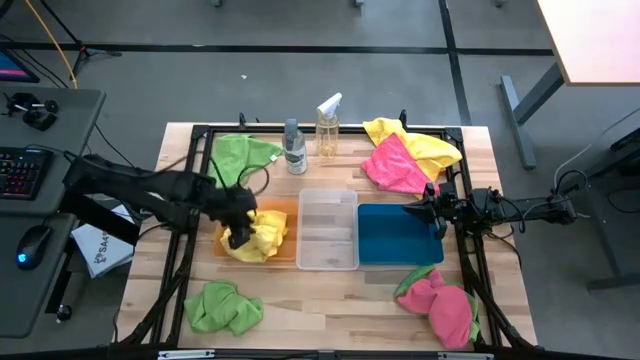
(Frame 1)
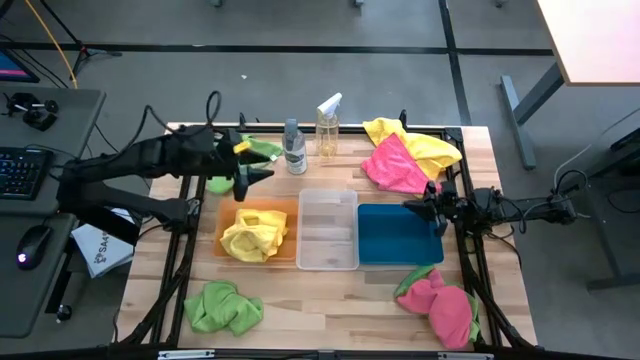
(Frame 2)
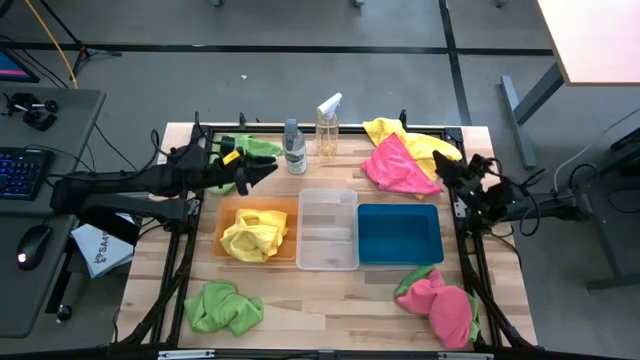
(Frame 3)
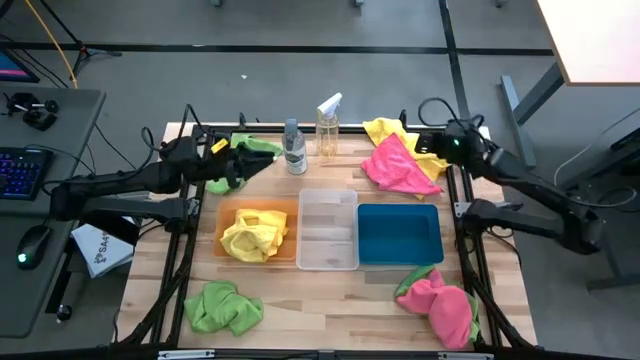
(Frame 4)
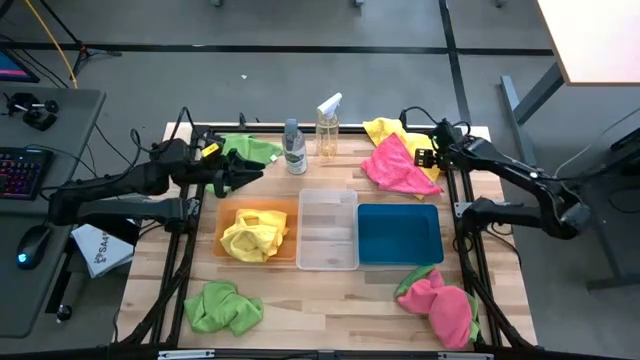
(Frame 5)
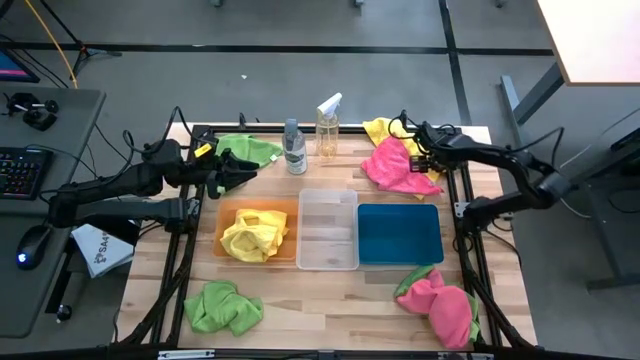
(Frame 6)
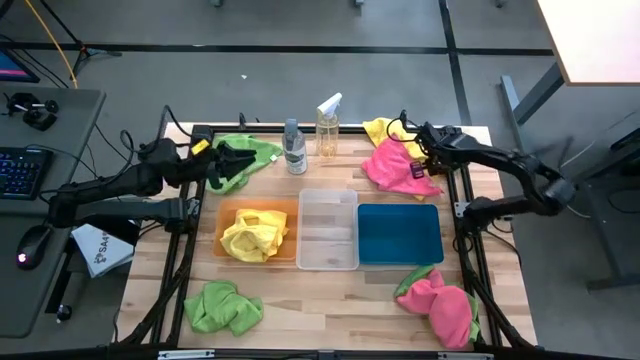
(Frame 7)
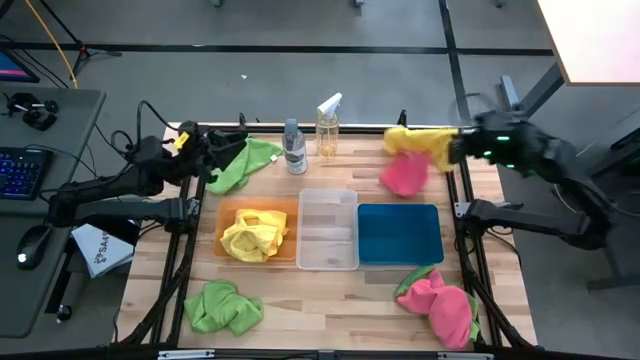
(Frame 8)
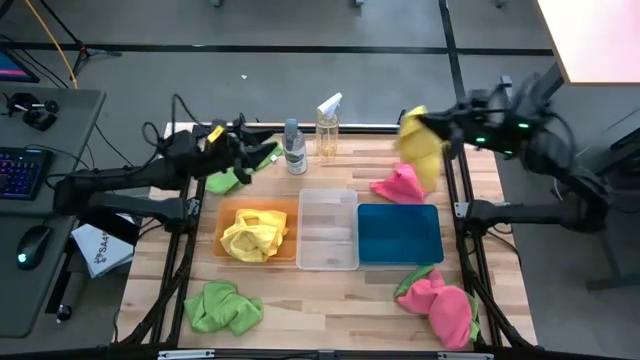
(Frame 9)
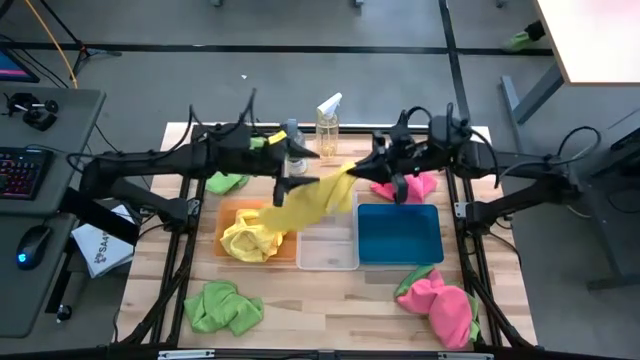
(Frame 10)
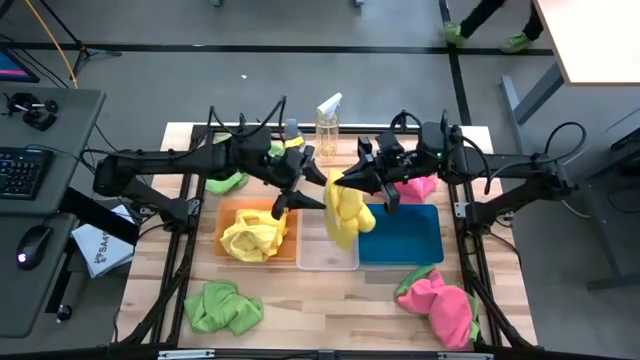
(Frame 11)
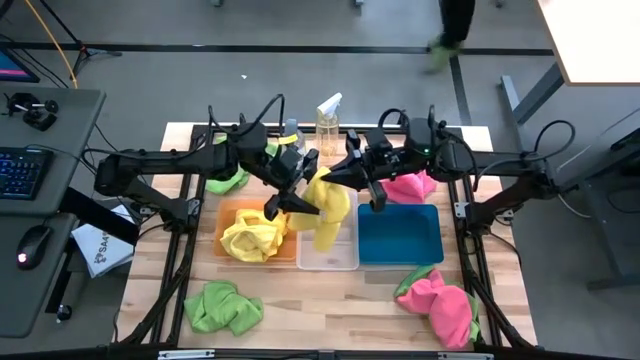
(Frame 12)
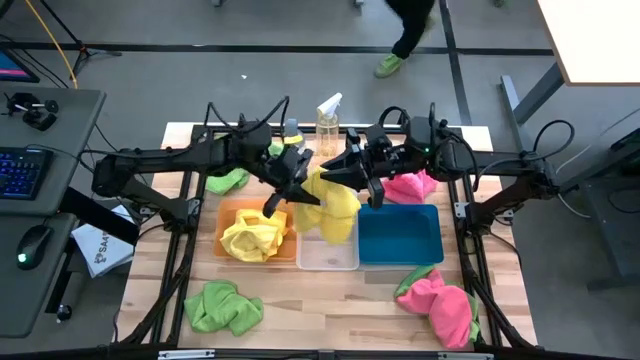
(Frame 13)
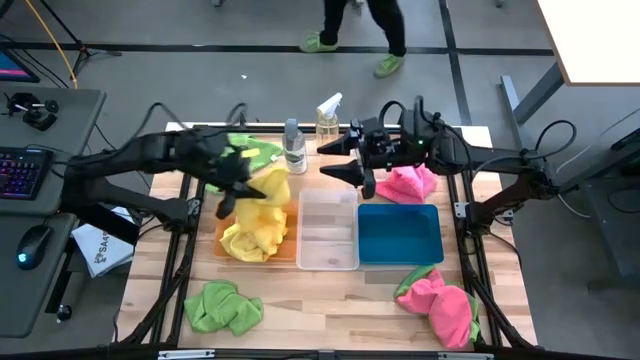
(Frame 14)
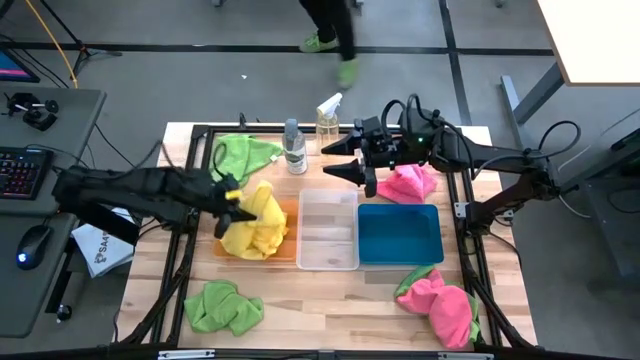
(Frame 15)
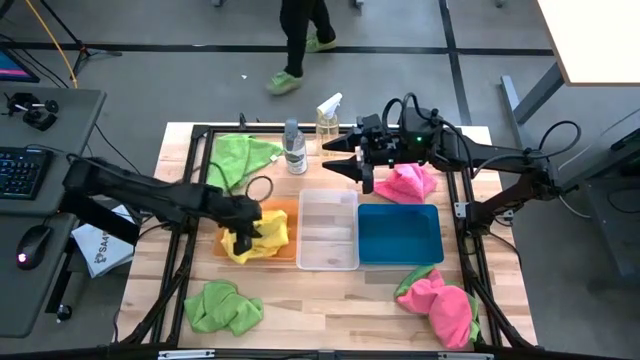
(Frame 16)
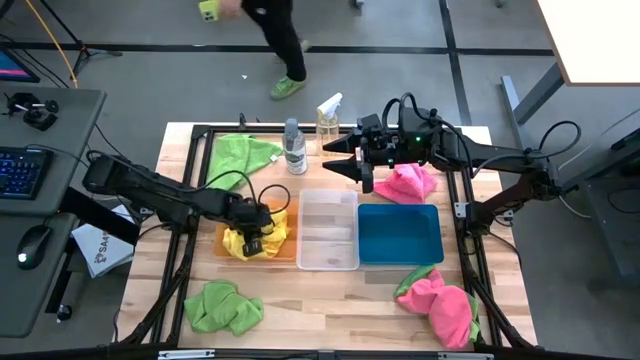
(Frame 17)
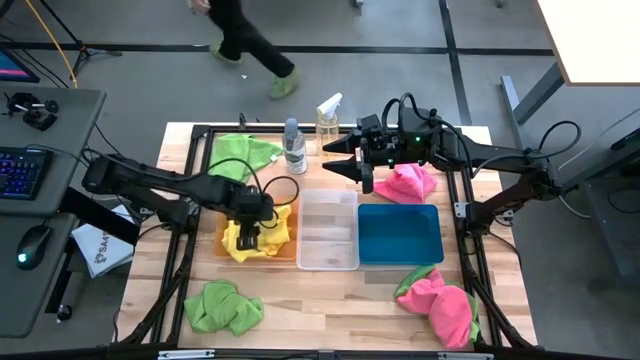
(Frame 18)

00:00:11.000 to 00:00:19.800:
Task: Sort microfiber towel by color & place in baskets
Put the yellow microfiber cloth into the orange bin

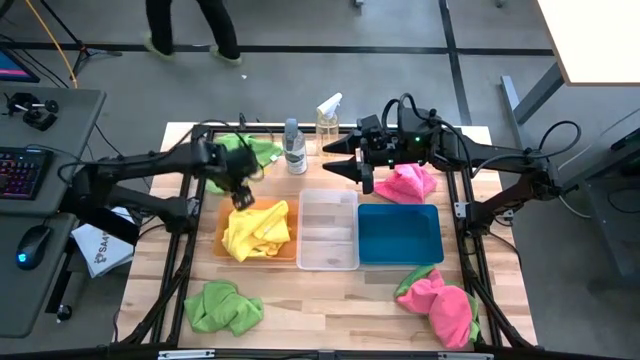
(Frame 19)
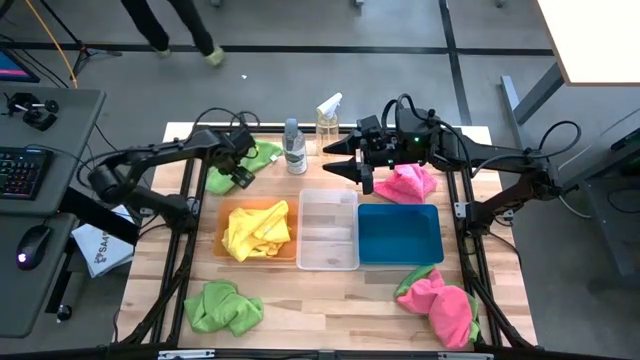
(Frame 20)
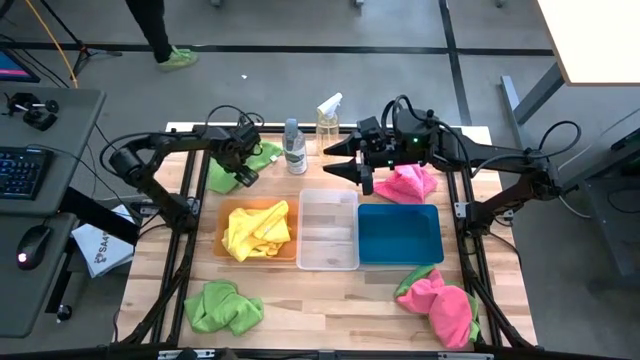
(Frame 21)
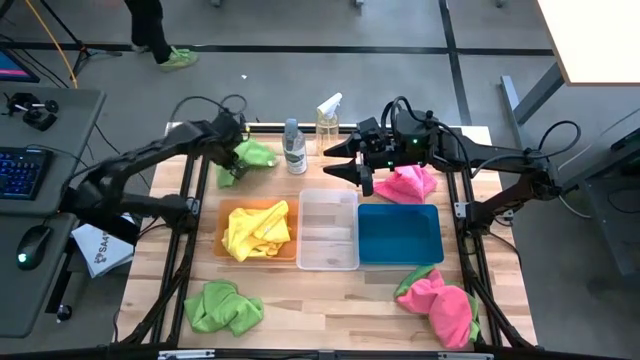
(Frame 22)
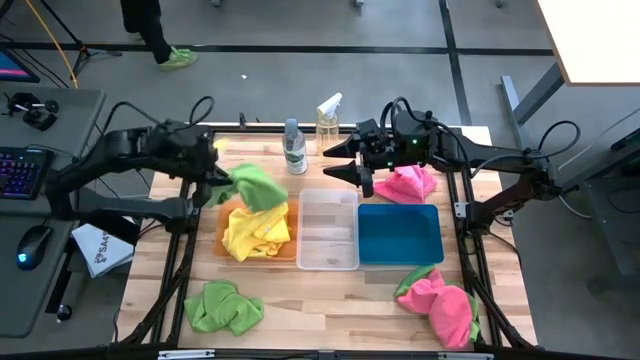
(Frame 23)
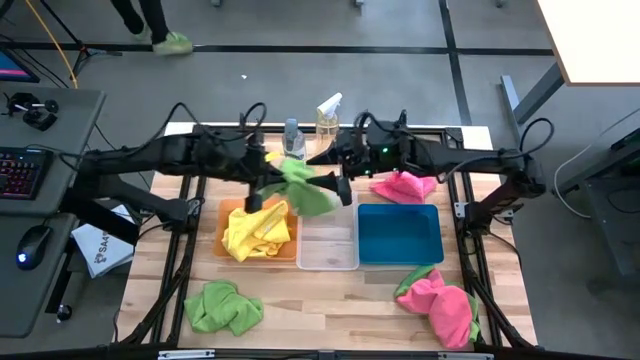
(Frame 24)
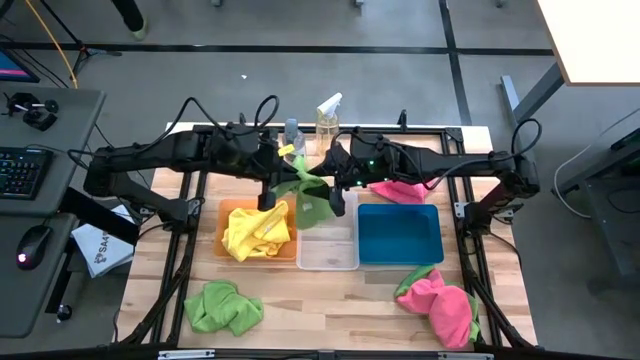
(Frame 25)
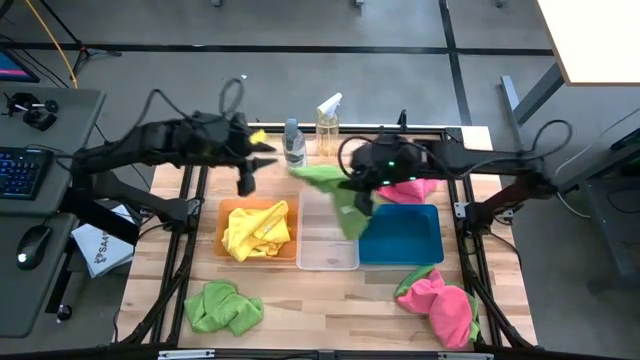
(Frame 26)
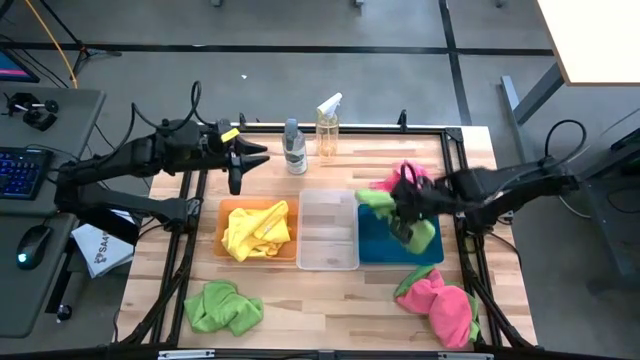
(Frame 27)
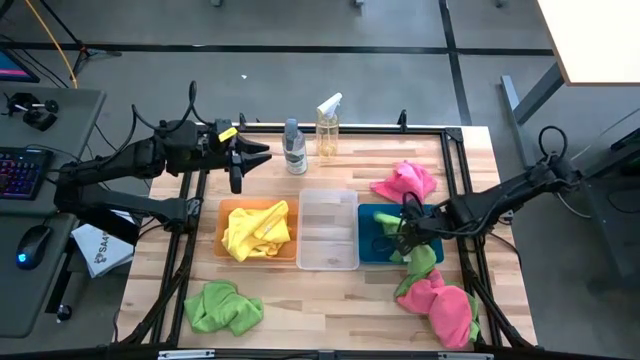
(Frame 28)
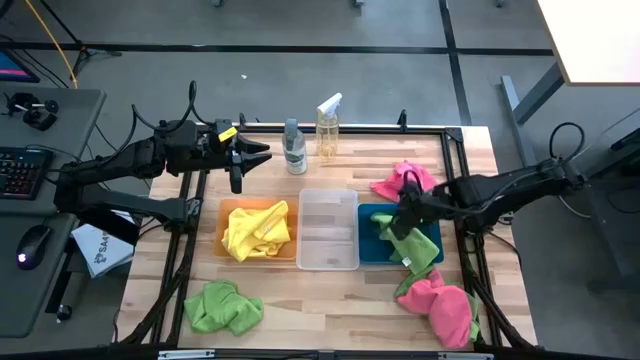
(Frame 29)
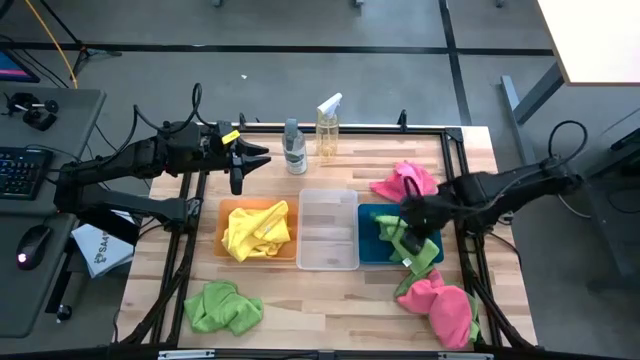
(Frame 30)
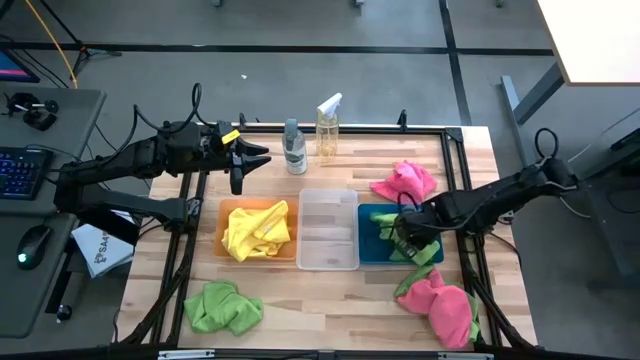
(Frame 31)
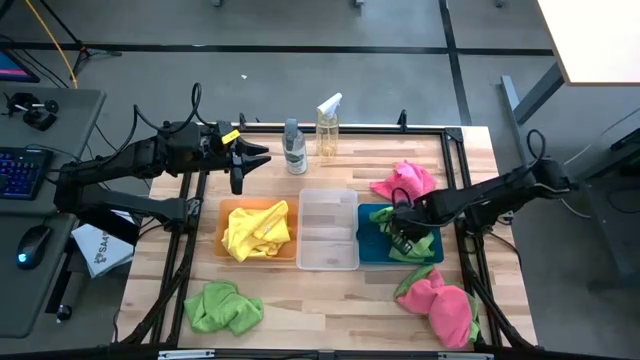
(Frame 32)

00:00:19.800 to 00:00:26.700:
Put the top left green microfiber cloth into the blue bin

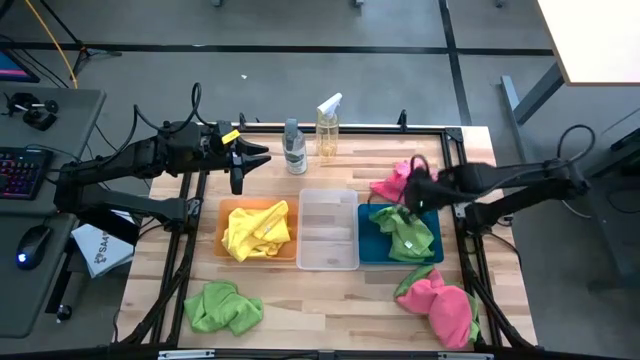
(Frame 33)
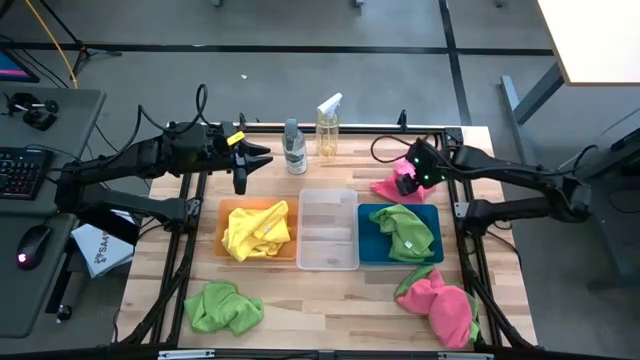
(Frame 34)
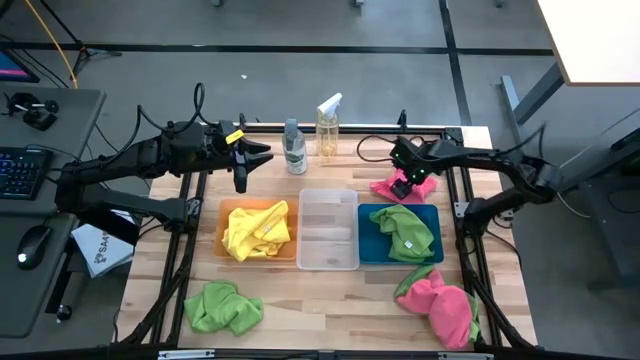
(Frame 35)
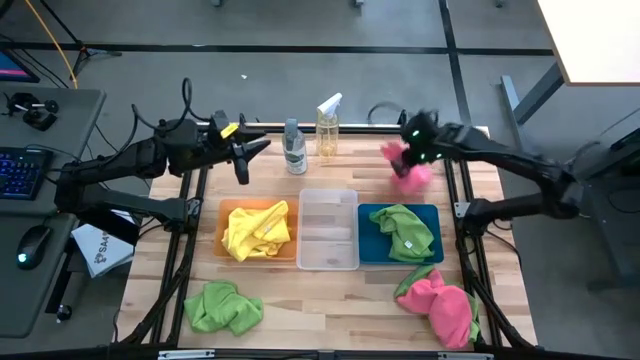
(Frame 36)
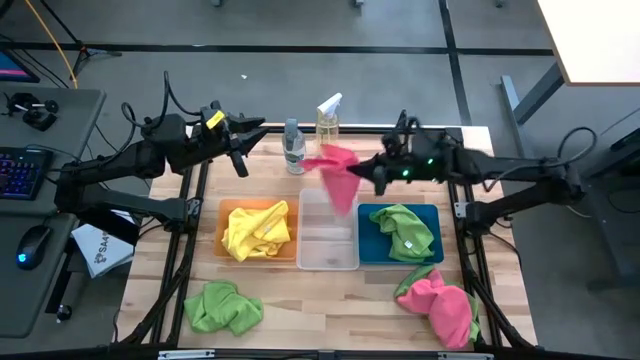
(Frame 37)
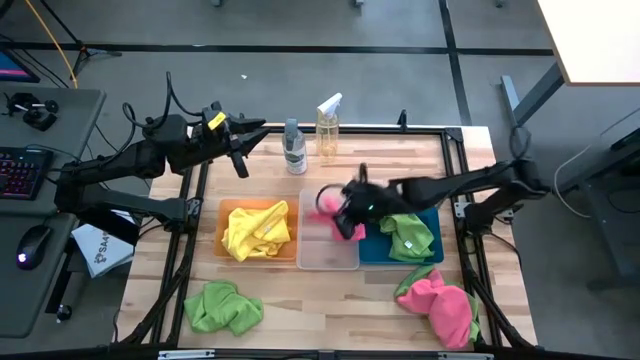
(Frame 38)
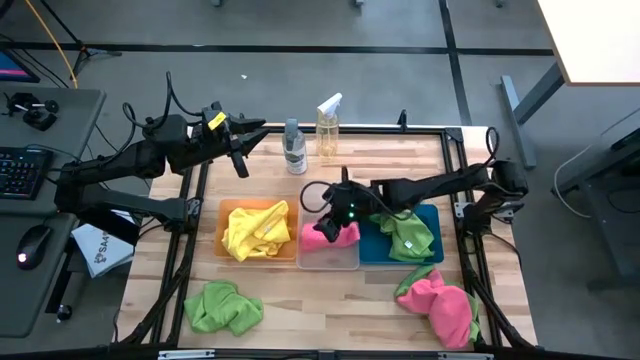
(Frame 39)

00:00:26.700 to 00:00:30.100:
Put the top pink microfiber cloth into the transparent bin

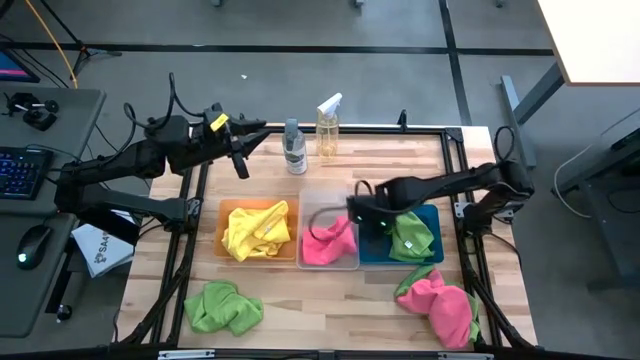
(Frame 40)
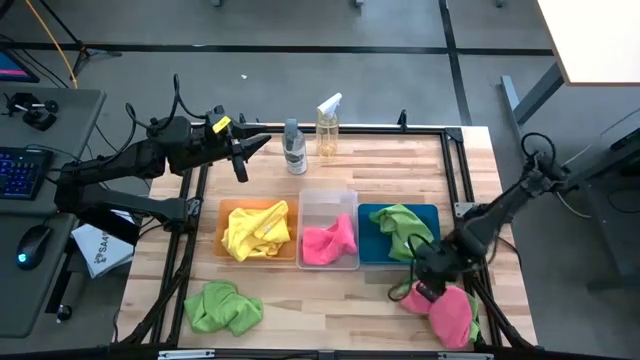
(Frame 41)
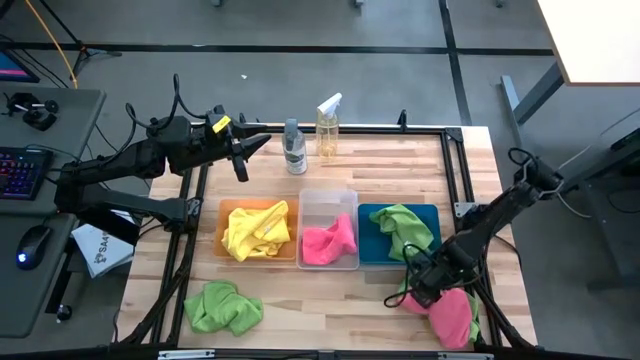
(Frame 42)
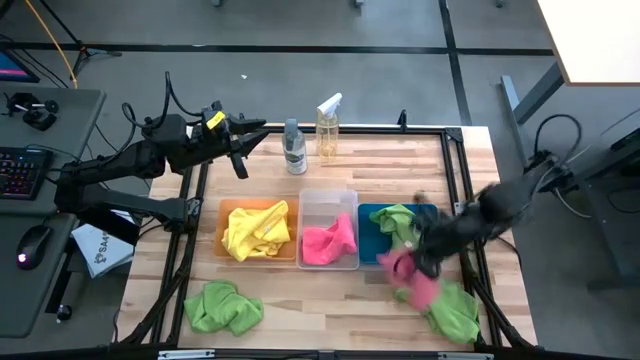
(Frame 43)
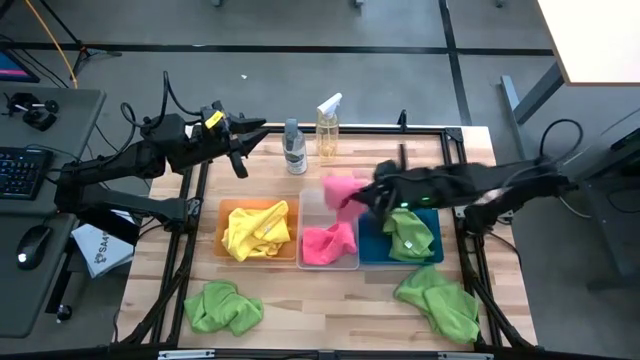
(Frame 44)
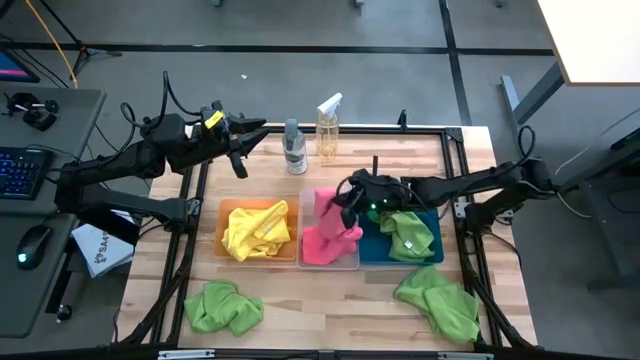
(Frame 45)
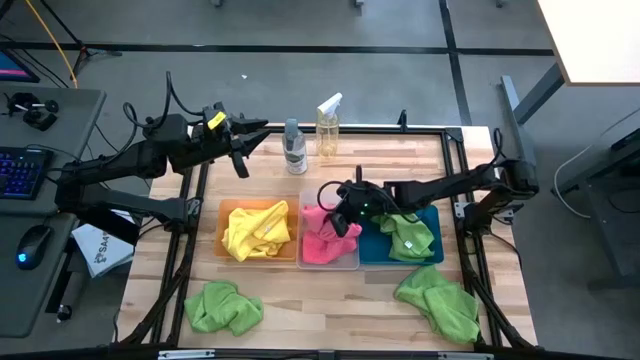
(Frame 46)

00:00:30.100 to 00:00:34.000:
Put the pink microfiber cloth into the transparent bin
